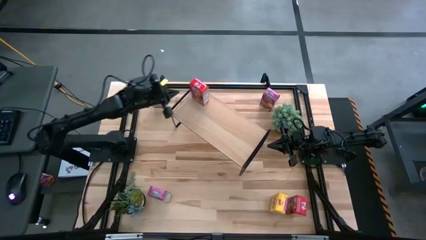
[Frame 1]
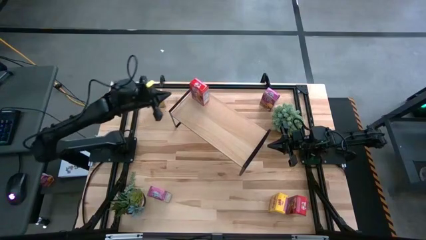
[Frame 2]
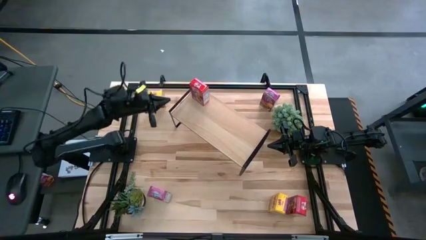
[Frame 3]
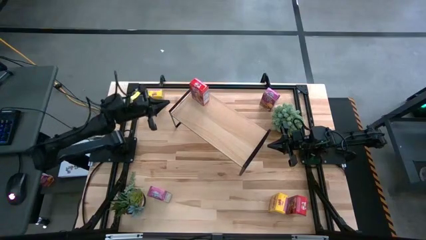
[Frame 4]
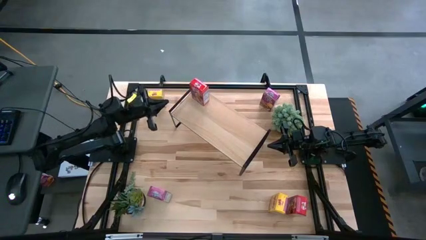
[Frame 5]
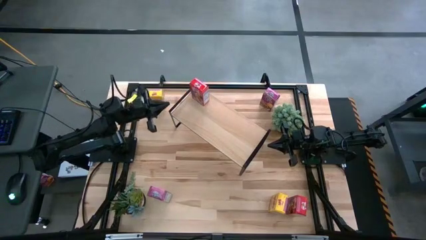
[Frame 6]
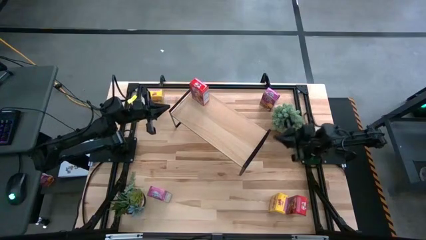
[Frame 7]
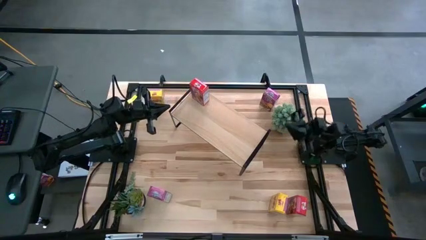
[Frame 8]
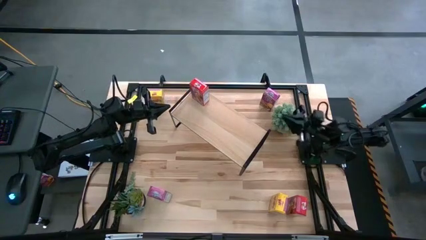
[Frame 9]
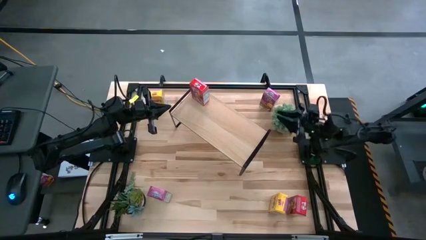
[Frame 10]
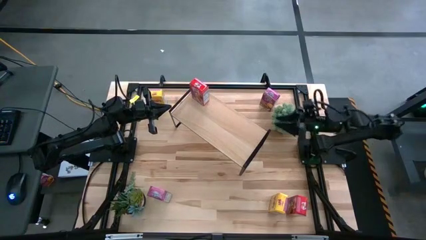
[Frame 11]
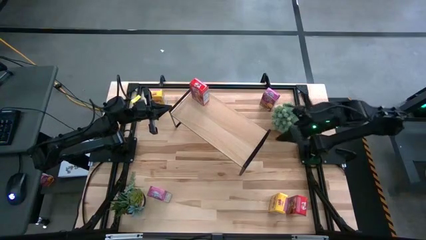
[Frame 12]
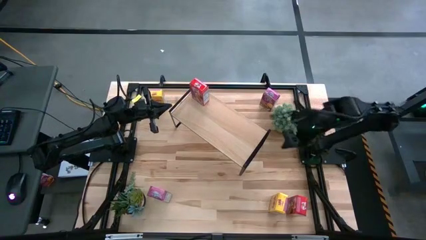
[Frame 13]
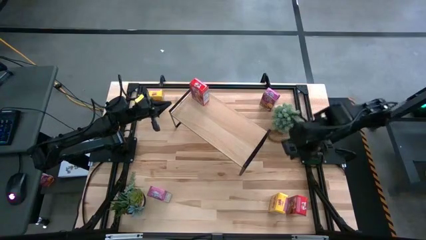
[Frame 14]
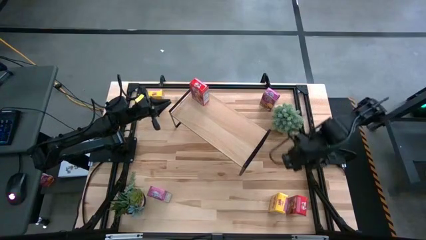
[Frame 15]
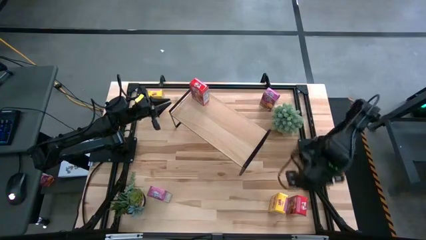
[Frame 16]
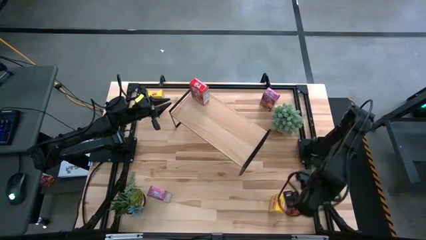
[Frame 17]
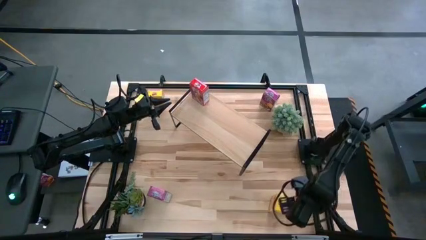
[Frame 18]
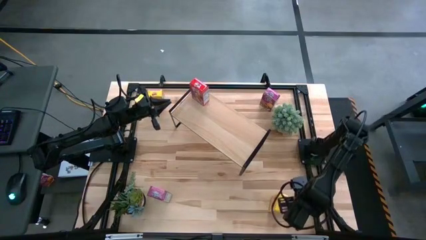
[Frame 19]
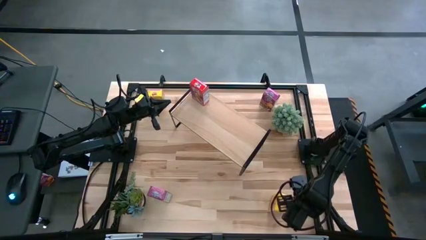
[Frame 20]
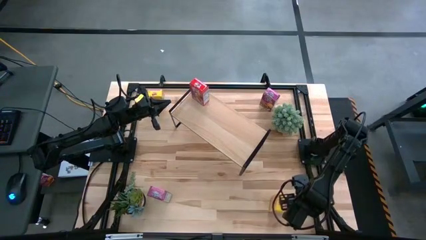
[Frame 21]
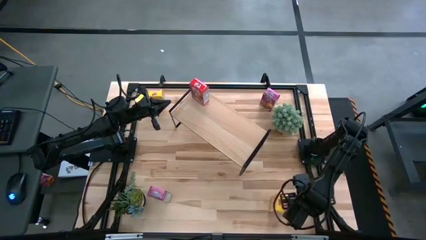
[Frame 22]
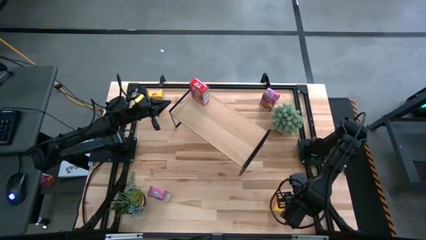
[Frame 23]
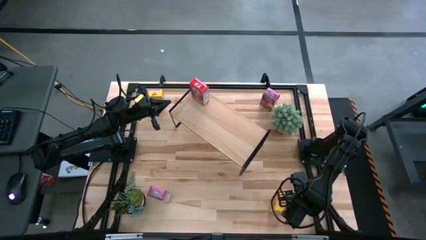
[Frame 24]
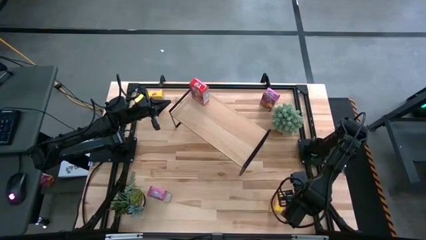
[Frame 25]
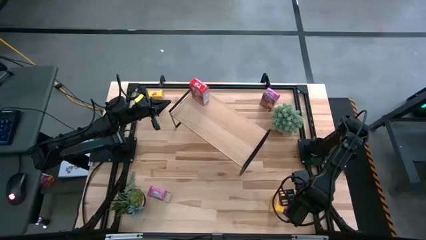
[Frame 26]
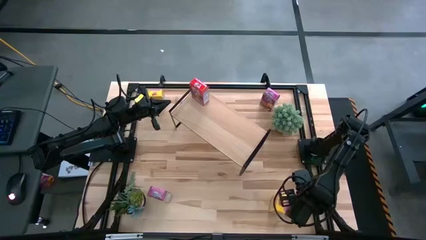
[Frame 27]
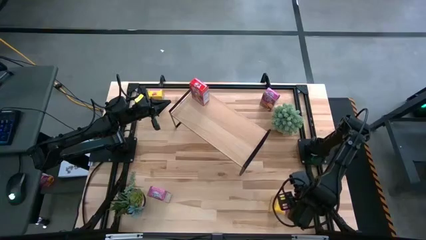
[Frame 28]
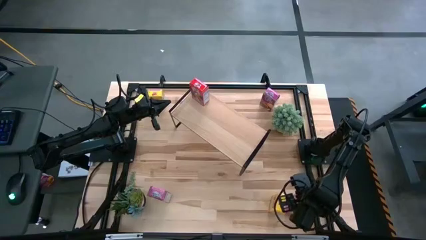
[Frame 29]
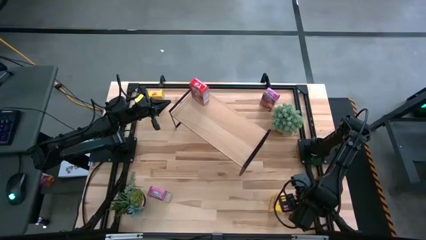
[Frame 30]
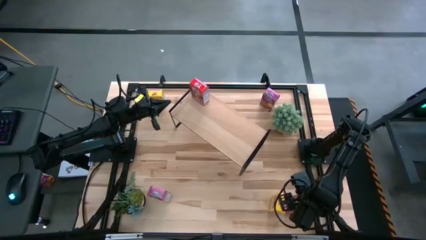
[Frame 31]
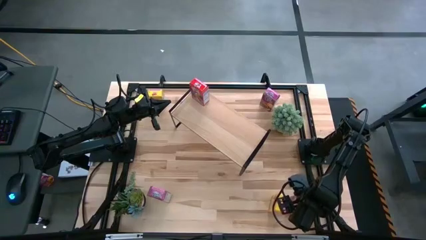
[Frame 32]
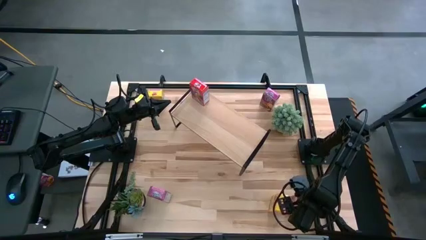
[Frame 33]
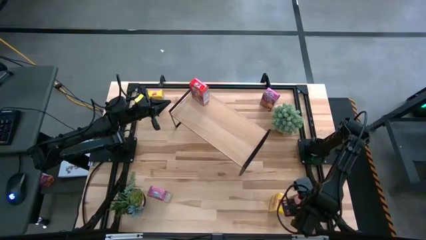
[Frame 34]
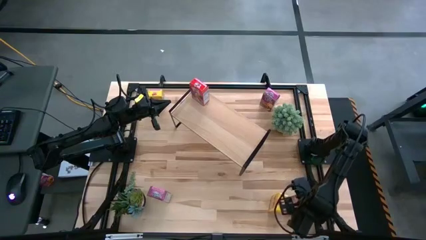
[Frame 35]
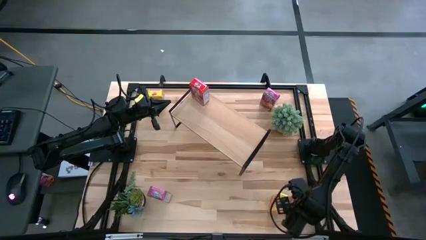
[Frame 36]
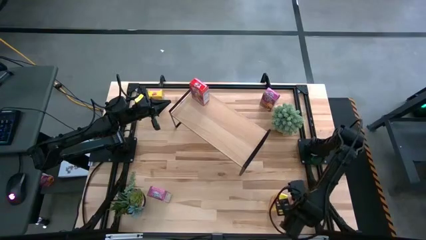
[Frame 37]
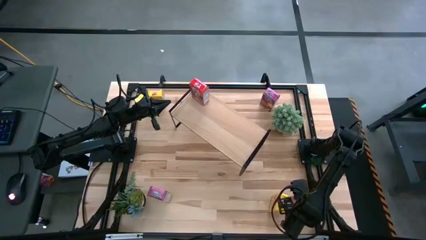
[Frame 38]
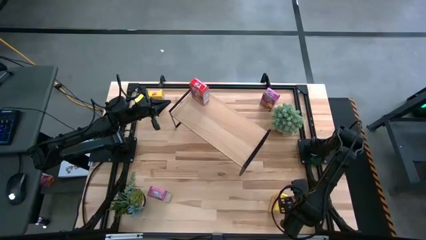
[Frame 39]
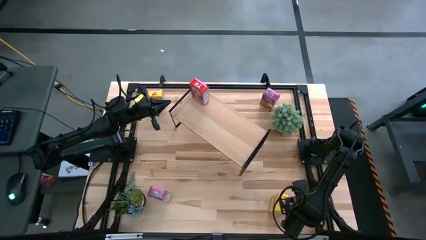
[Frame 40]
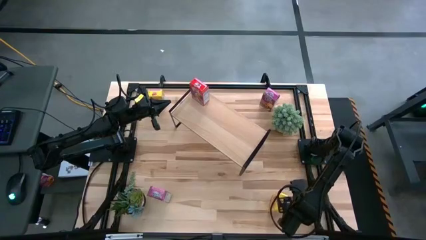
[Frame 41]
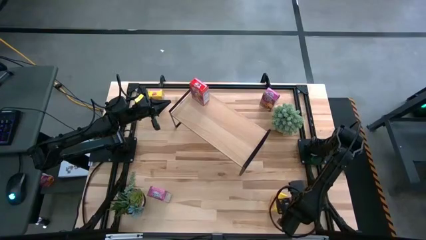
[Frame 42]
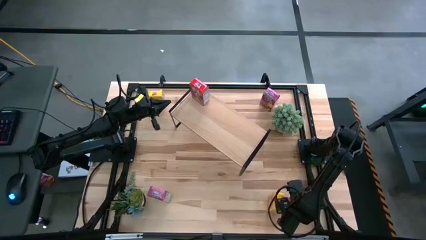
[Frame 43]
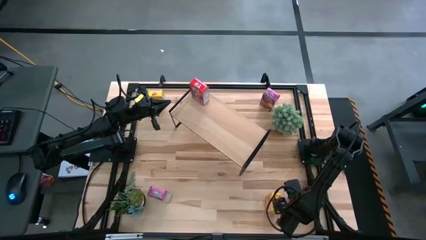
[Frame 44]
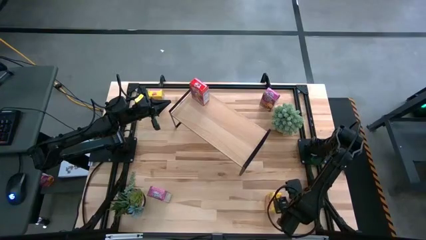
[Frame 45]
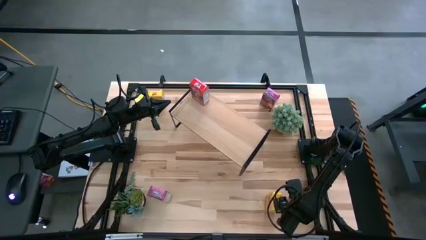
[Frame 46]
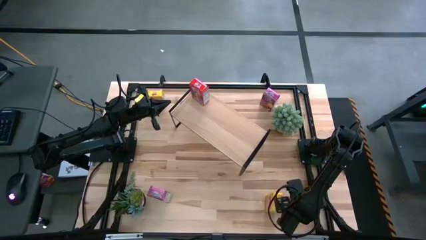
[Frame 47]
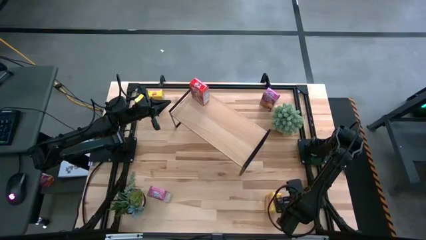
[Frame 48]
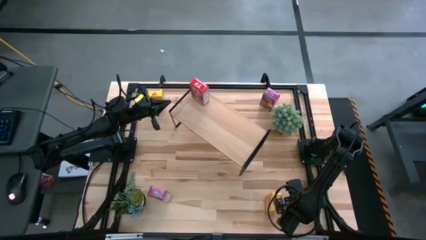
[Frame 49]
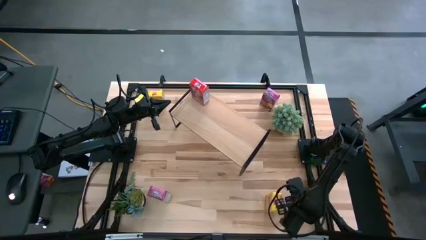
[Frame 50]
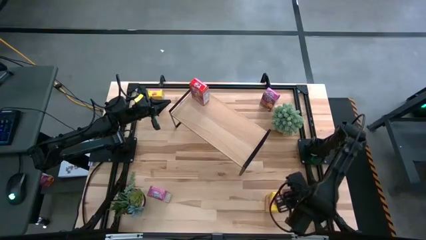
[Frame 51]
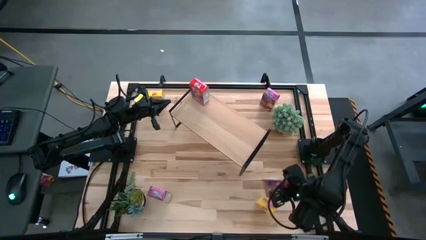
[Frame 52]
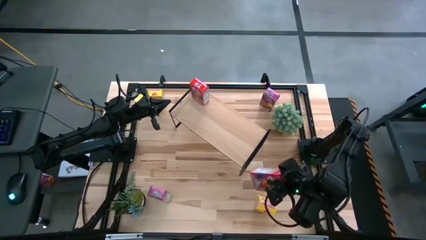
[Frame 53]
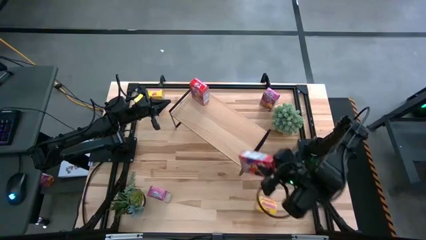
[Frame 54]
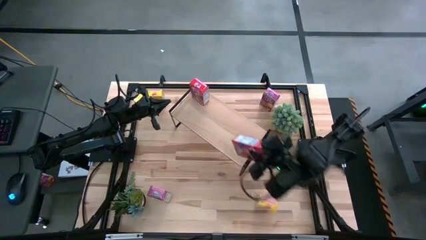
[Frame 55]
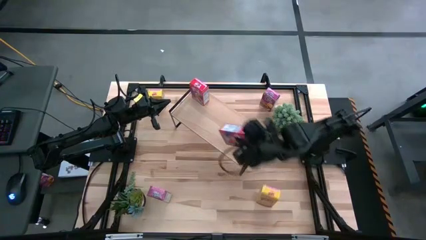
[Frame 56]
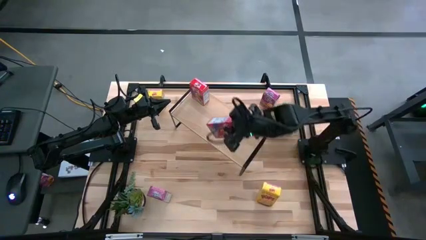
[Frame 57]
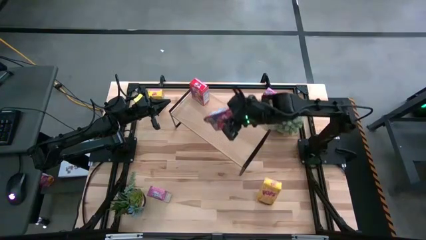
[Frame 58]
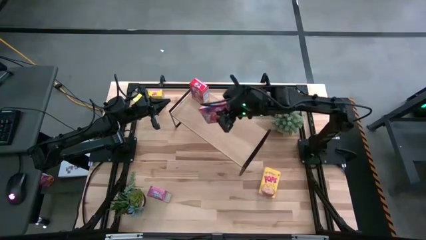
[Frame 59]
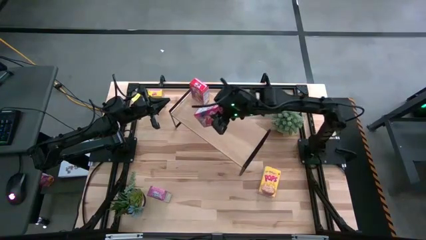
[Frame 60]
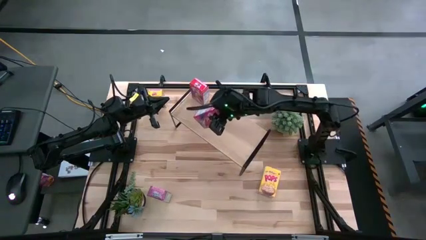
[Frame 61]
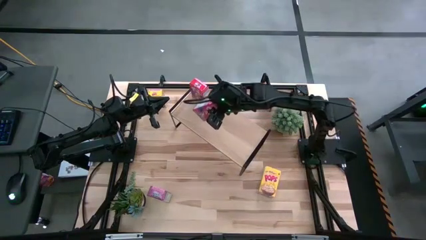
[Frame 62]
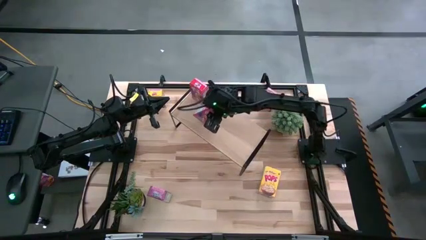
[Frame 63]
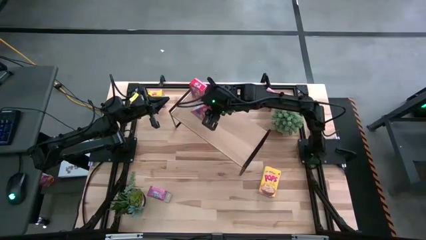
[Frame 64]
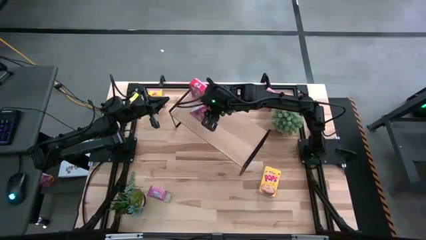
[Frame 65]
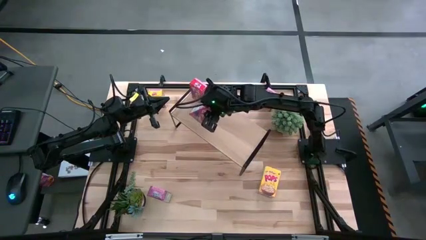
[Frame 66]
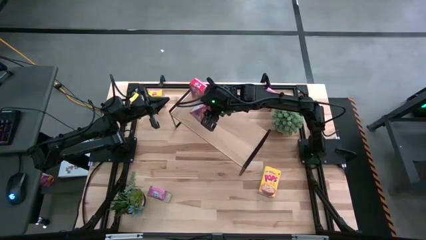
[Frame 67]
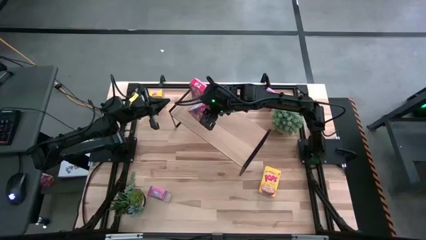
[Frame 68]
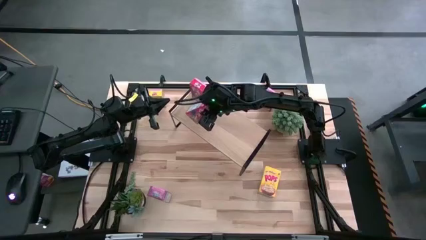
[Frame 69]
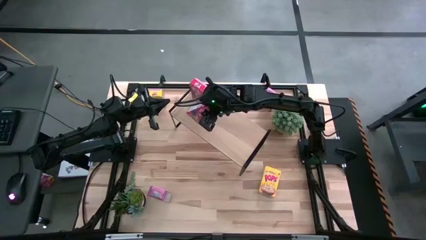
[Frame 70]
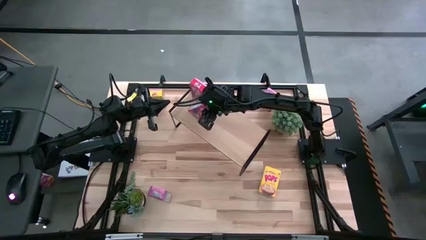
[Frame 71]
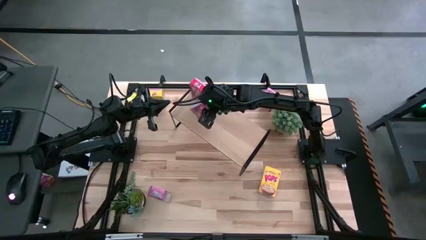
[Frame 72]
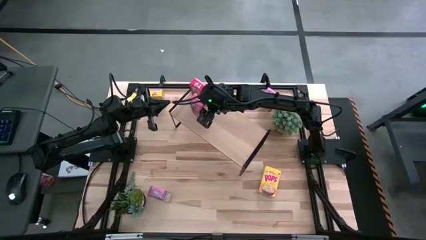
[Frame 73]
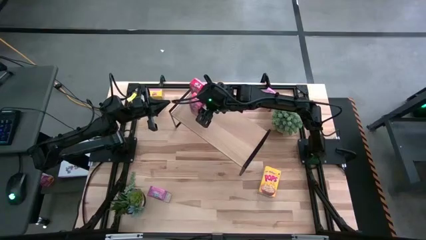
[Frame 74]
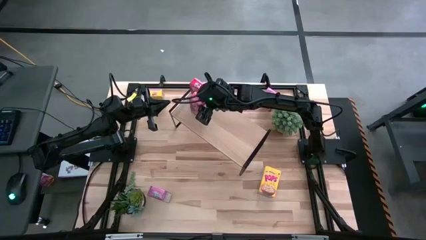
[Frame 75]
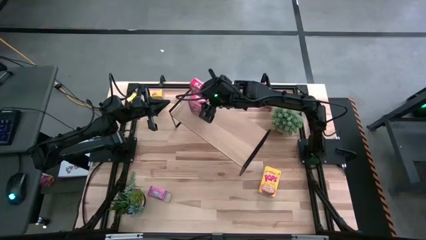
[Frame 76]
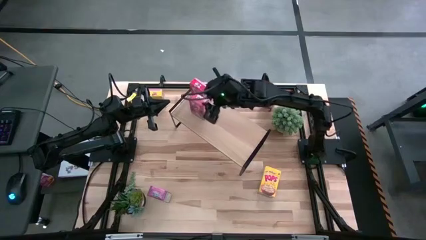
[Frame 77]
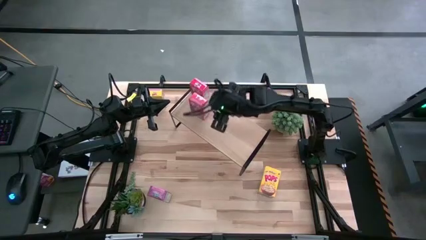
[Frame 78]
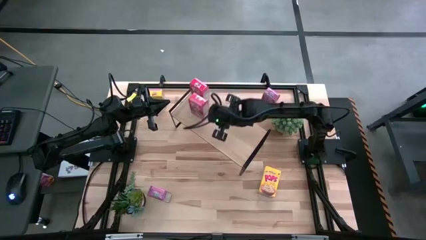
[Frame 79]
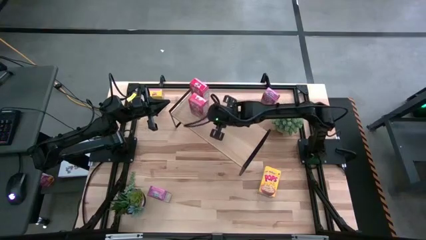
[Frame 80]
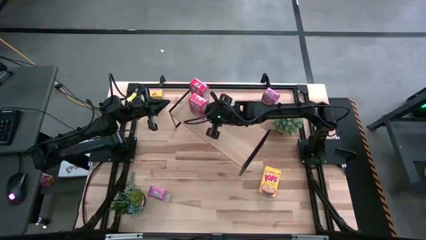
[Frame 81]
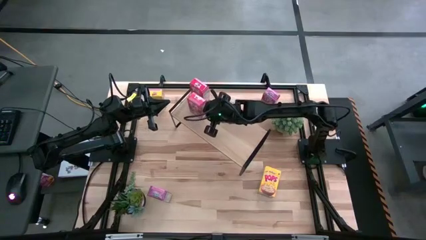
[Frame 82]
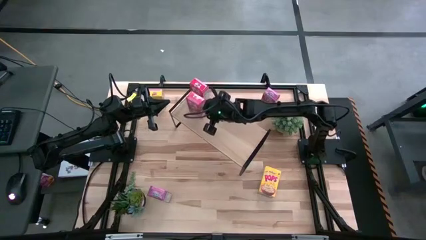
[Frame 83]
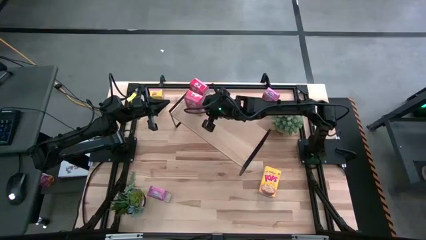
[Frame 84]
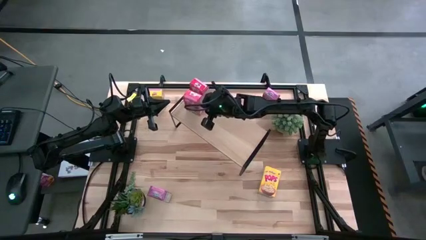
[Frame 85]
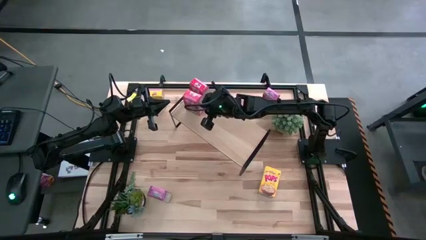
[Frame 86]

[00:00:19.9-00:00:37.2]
Task: Stack cereal on shelf
Put the red cereal box on the shelf
